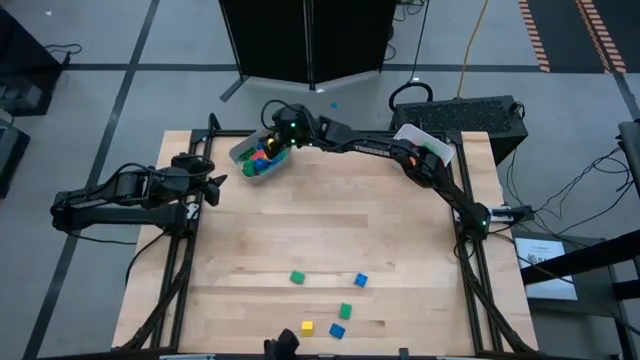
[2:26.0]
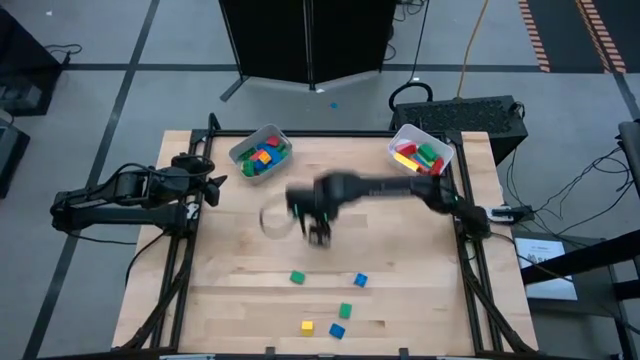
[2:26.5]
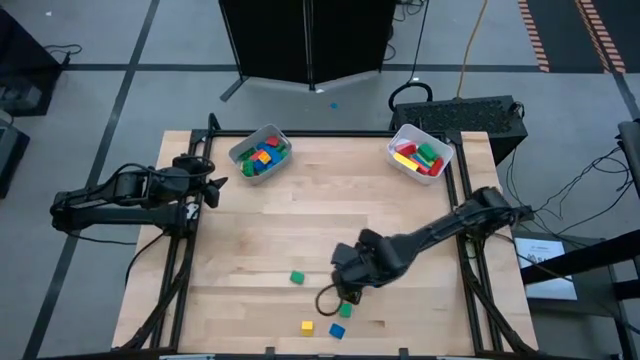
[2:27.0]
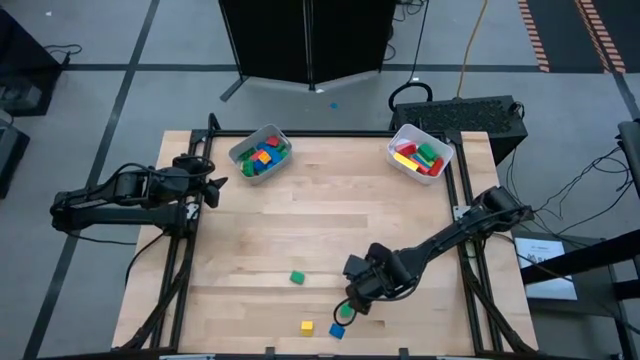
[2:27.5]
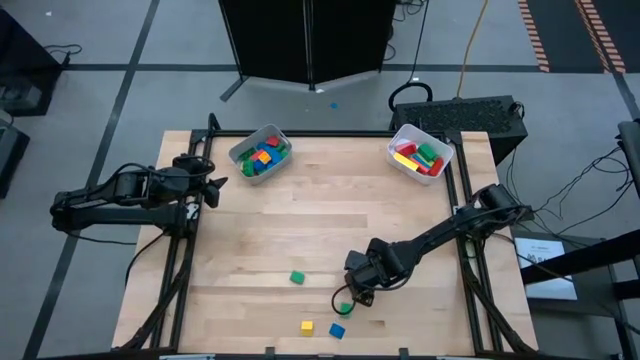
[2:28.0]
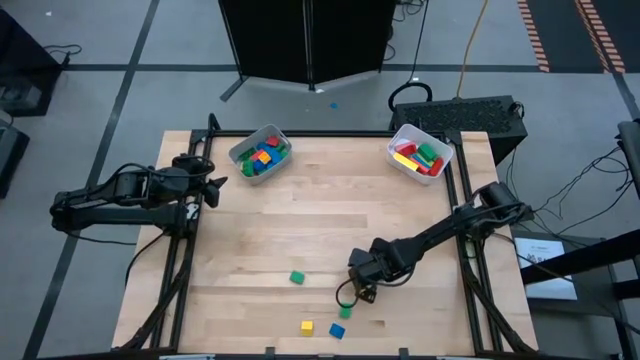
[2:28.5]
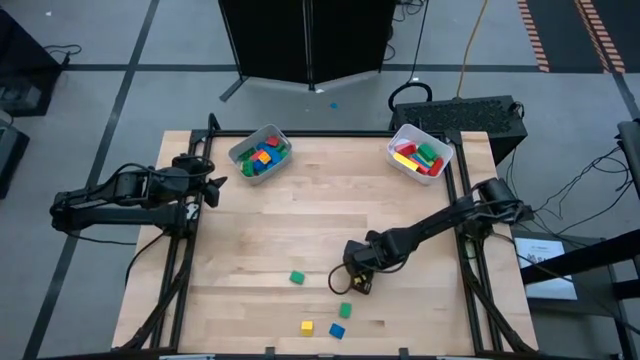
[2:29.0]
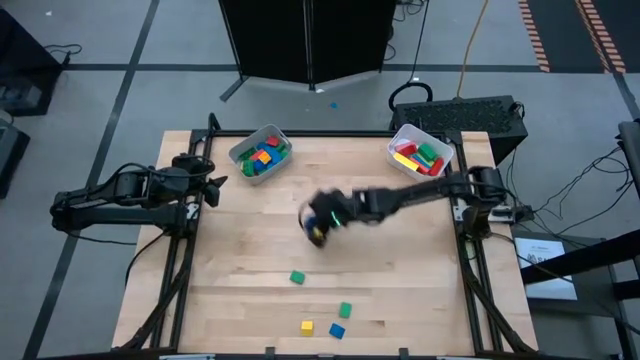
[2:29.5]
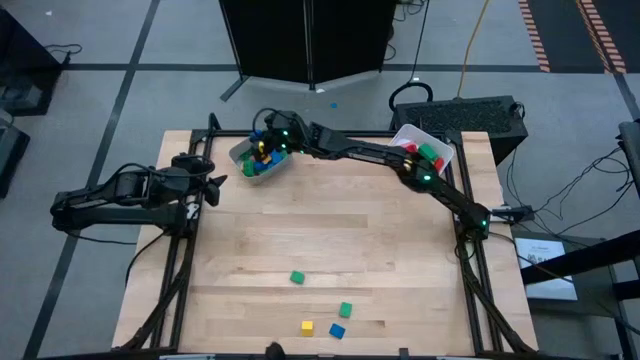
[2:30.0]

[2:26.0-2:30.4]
Task: Sort blocks by size
Put the 4 stud blue game piece into the gray bin

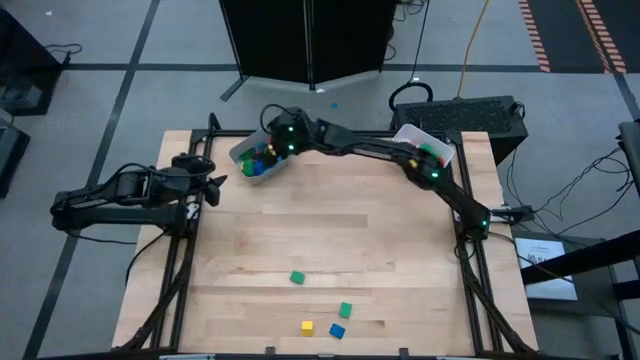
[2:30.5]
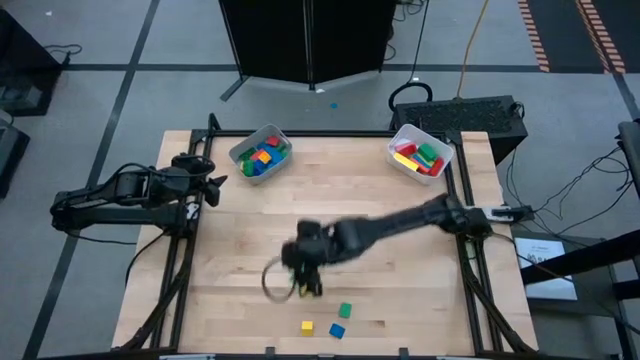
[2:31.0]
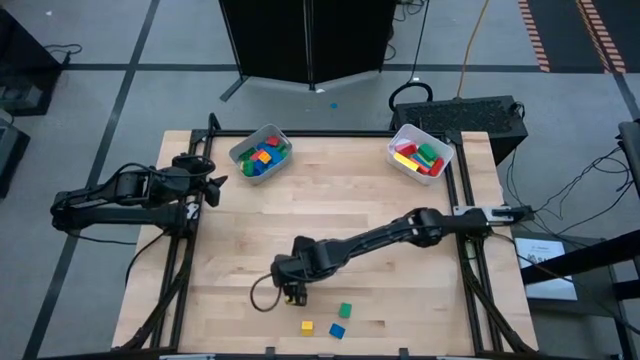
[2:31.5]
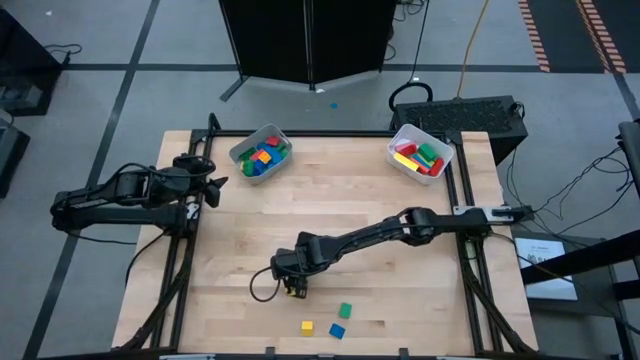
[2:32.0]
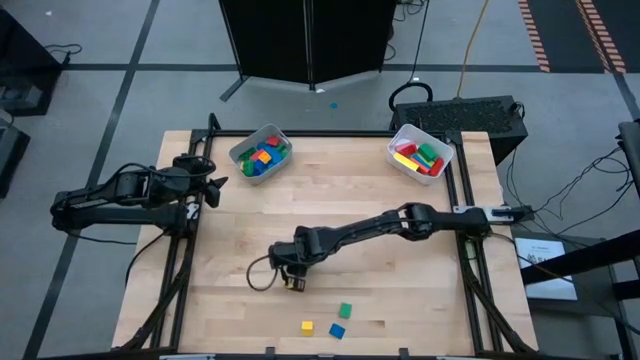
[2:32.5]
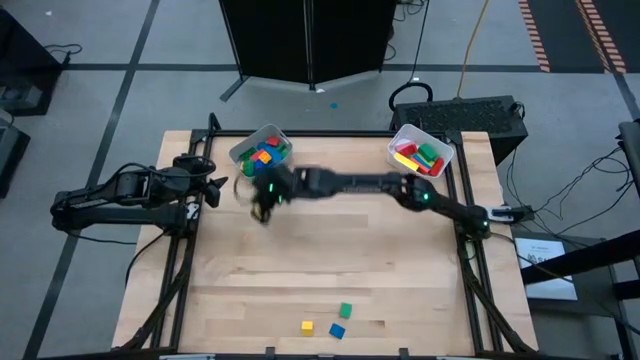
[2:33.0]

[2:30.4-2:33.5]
Put the half cylindrical green block into the gray bin

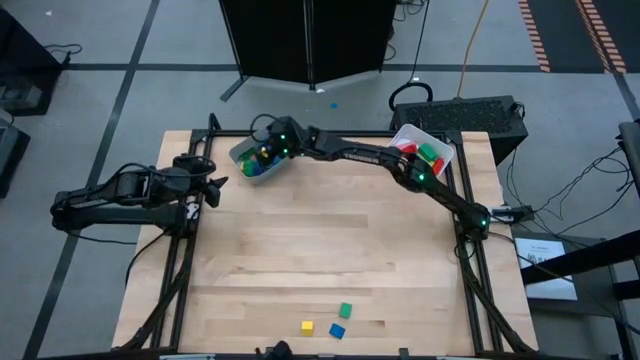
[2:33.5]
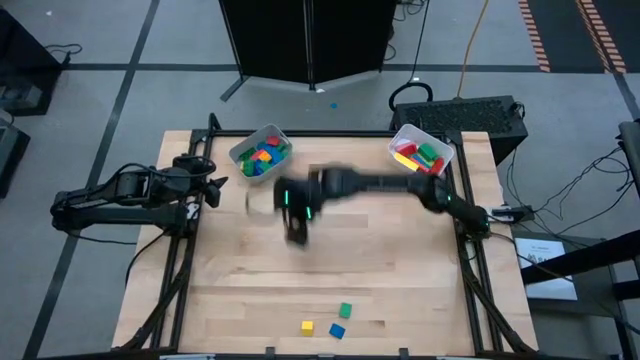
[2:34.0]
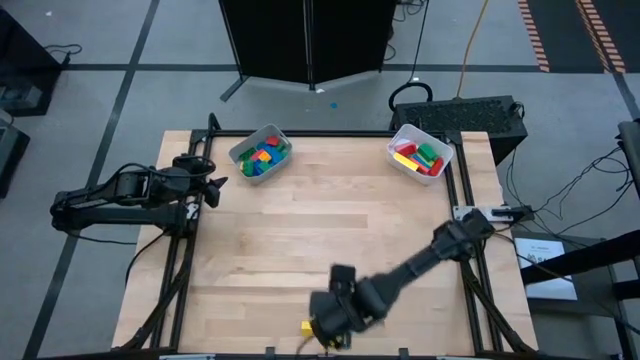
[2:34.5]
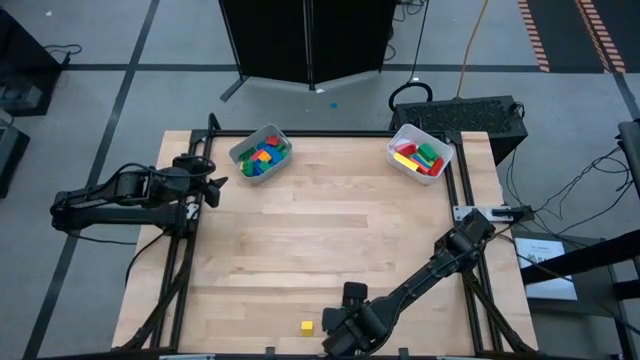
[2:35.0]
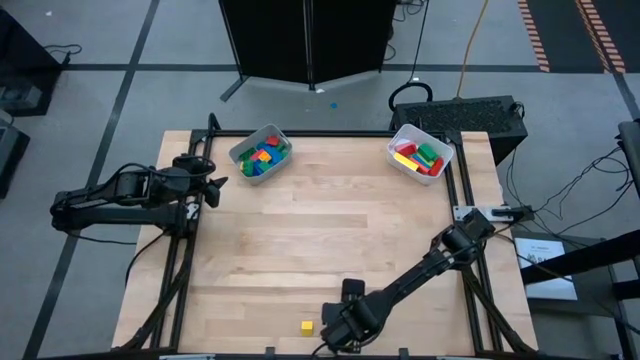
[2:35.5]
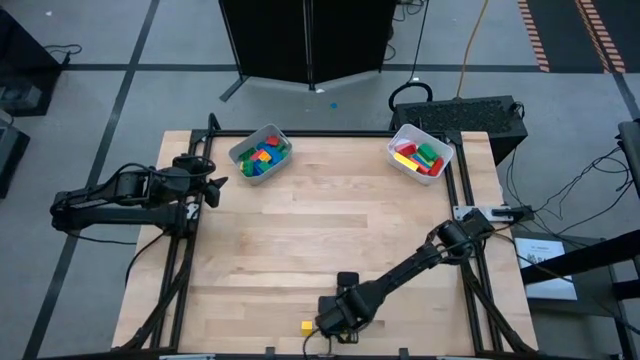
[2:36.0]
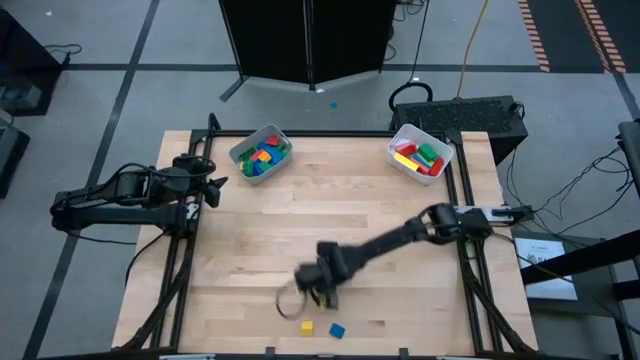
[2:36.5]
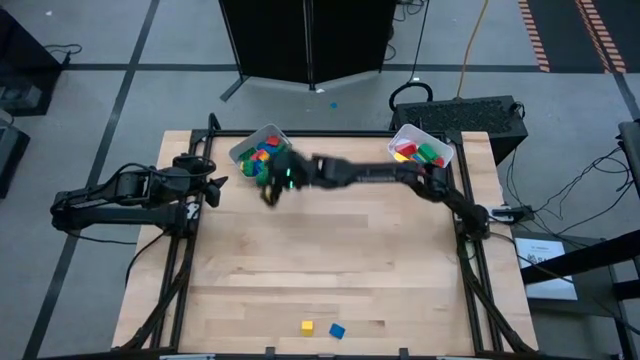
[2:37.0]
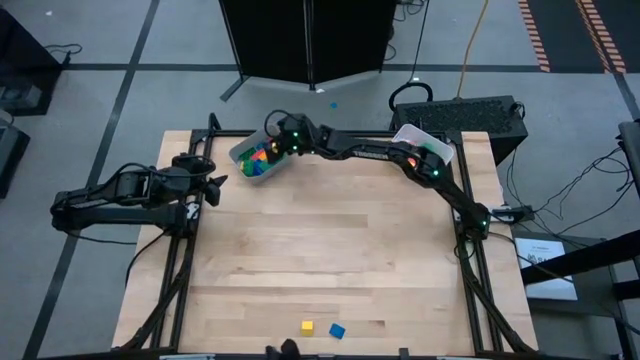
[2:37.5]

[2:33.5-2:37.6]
Put the half cylindrical green block into the gray bin

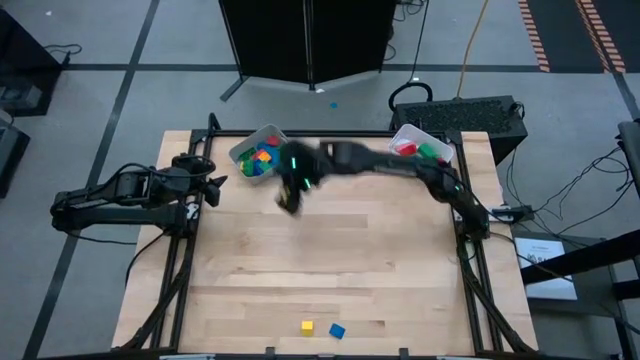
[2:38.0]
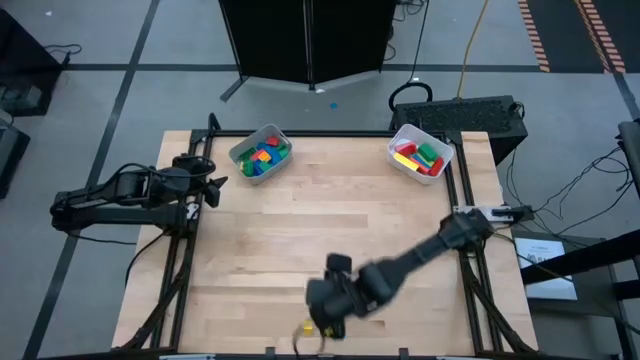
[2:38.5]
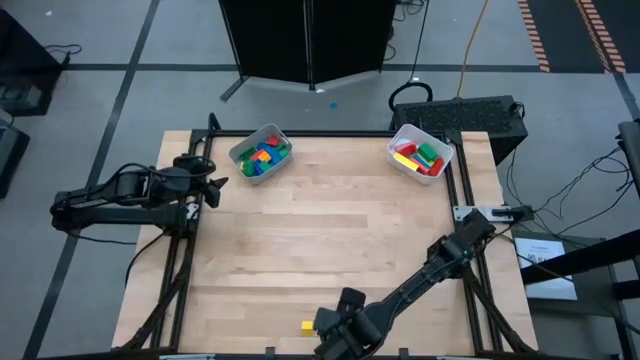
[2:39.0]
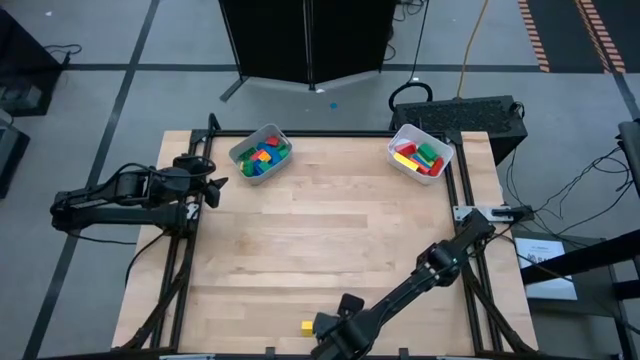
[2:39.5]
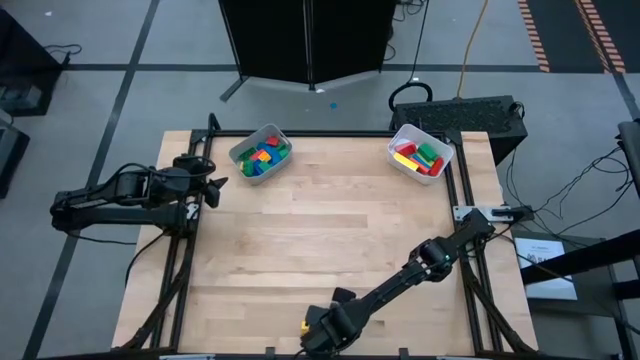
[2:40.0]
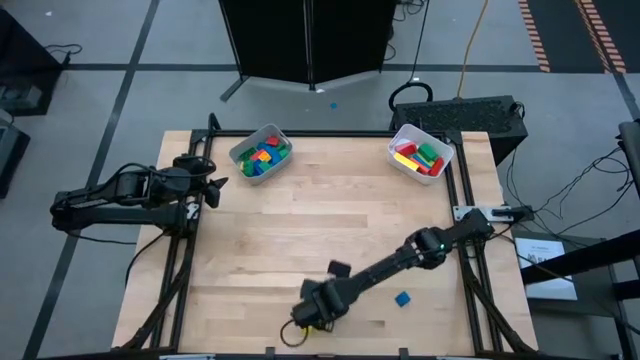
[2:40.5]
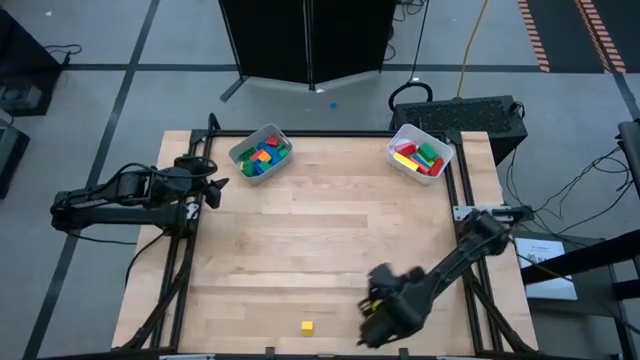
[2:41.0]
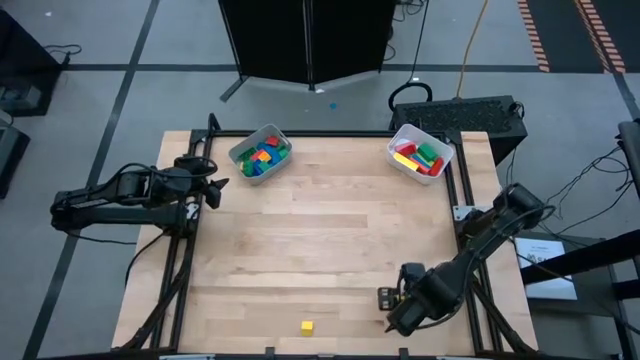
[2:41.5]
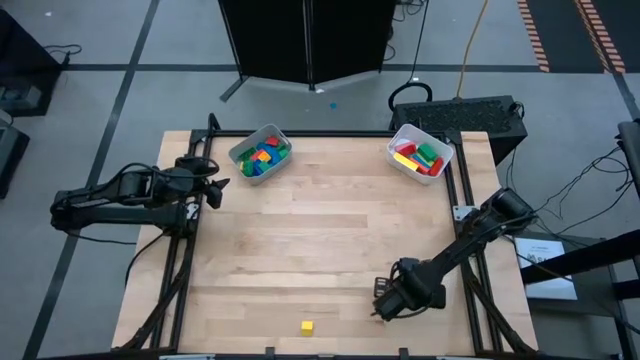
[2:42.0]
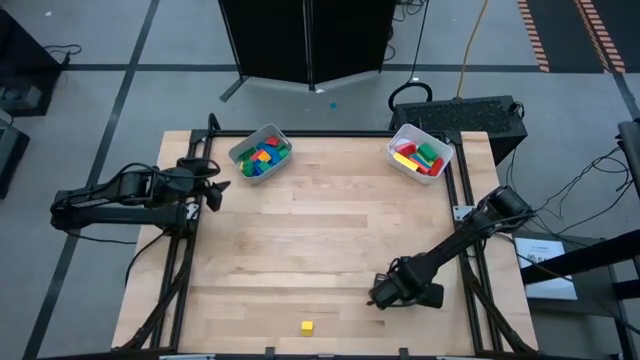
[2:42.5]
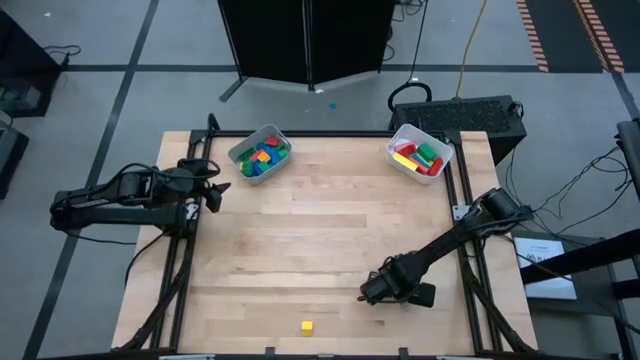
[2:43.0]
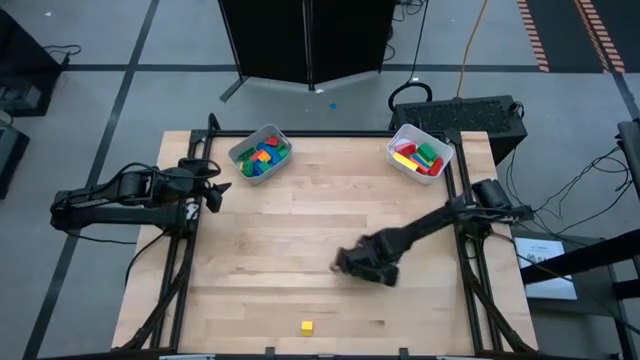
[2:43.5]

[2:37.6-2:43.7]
Put the triangular blue block into the gray bin

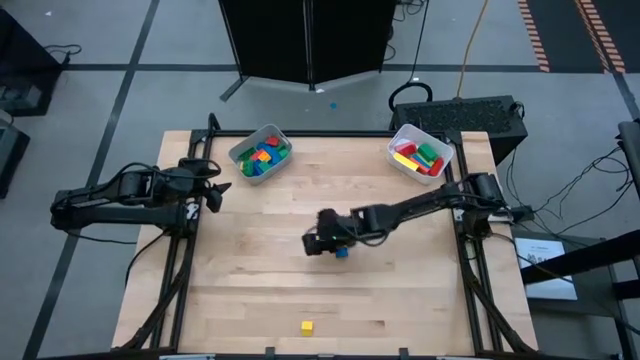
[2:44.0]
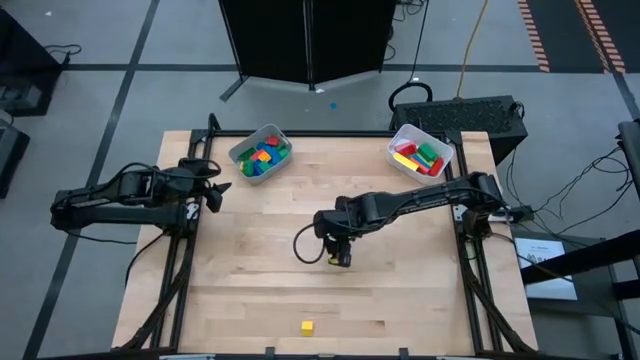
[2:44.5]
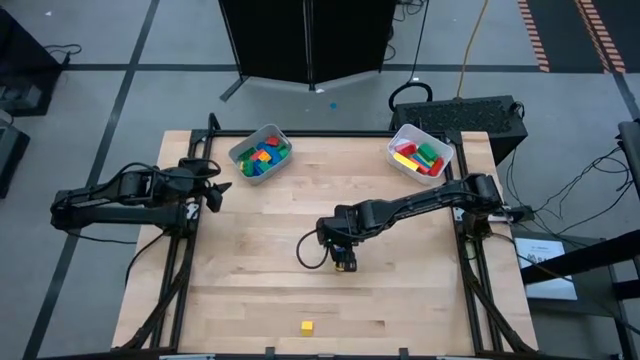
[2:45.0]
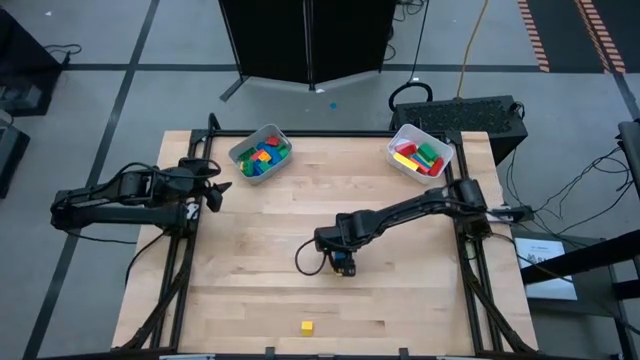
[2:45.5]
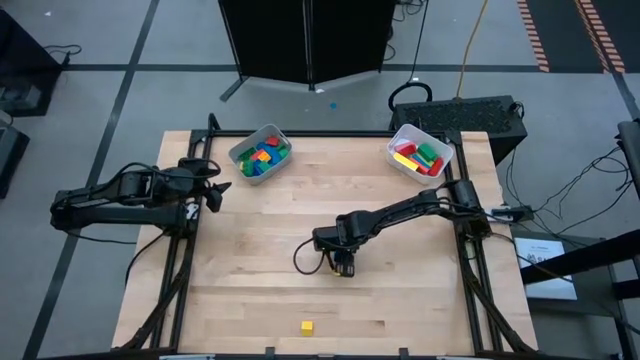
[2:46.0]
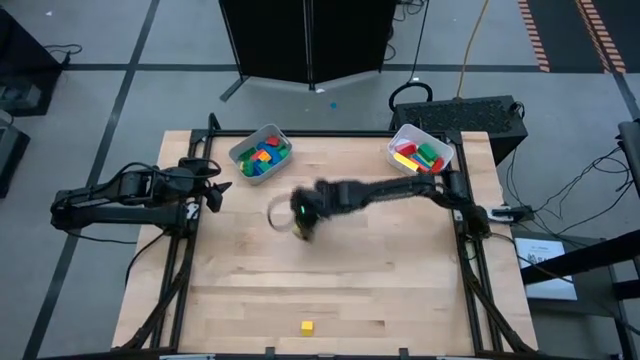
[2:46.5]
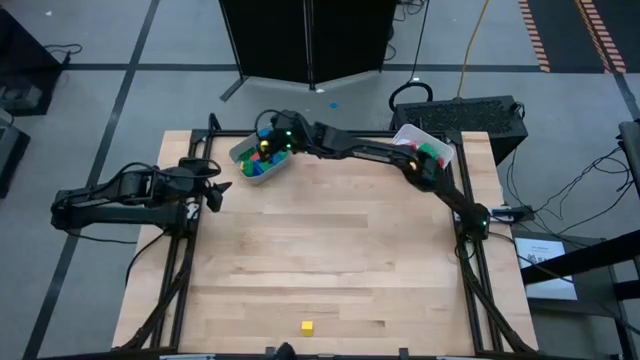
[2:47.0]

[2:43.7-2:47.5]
Put the triangular blue block into the gray bin
